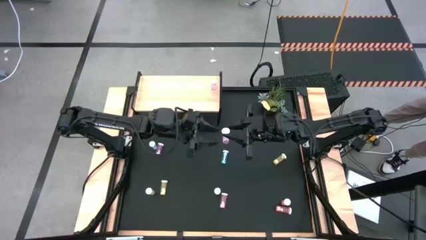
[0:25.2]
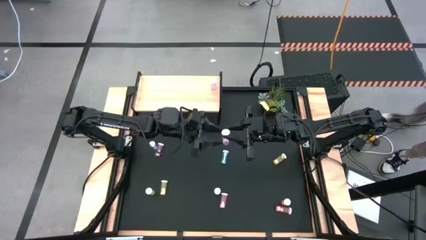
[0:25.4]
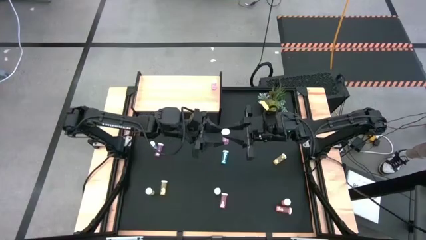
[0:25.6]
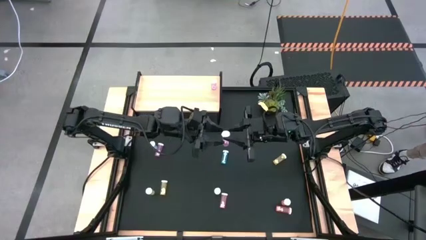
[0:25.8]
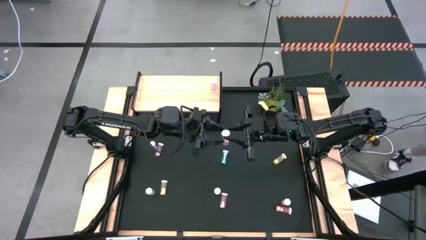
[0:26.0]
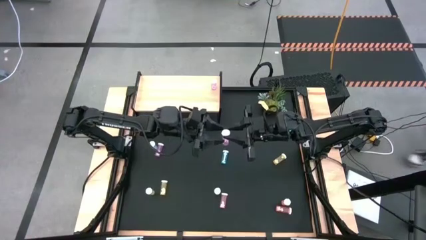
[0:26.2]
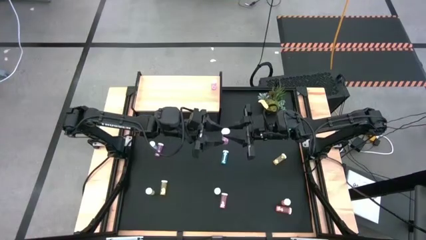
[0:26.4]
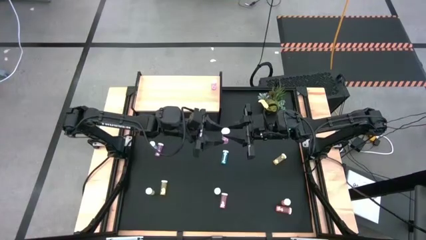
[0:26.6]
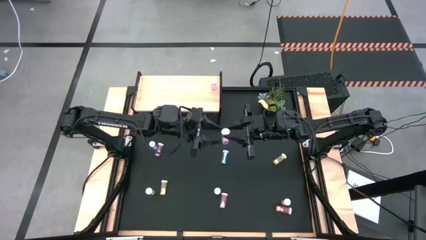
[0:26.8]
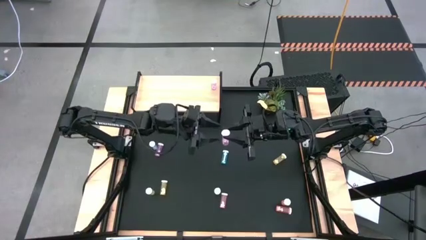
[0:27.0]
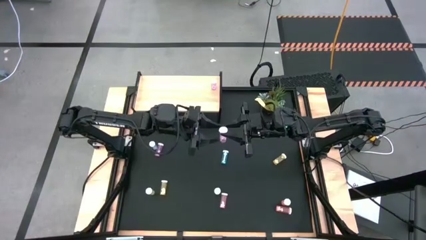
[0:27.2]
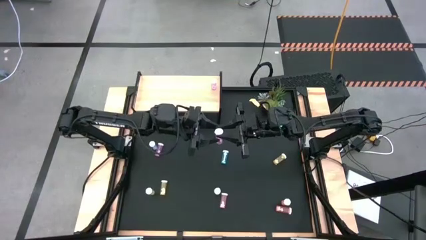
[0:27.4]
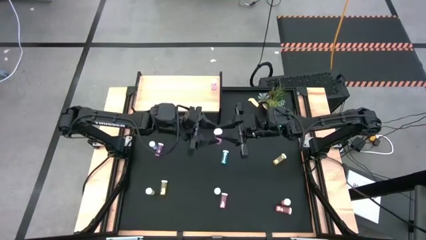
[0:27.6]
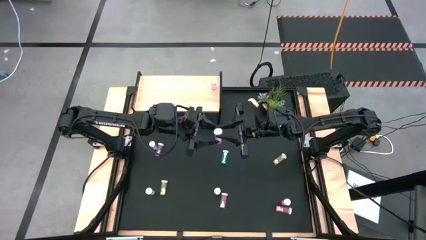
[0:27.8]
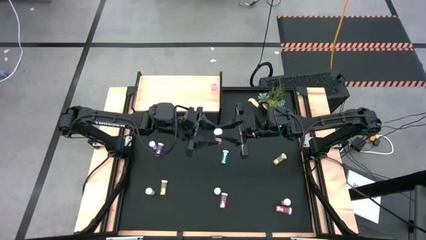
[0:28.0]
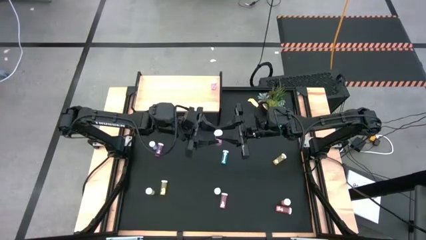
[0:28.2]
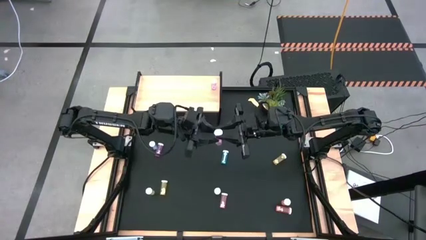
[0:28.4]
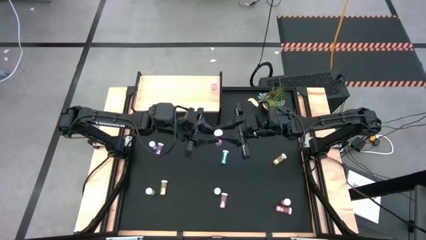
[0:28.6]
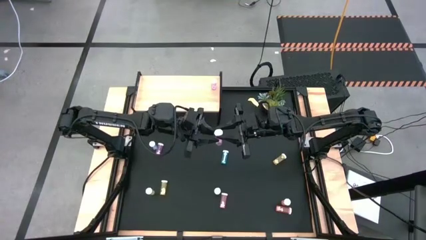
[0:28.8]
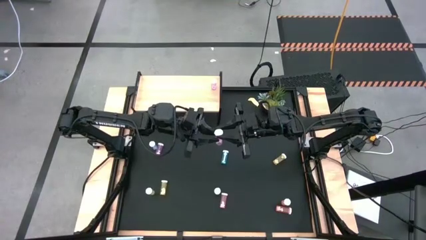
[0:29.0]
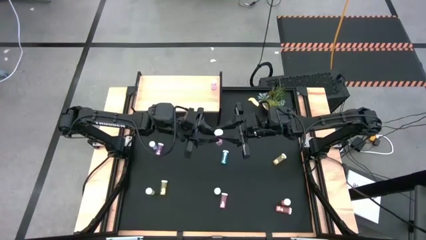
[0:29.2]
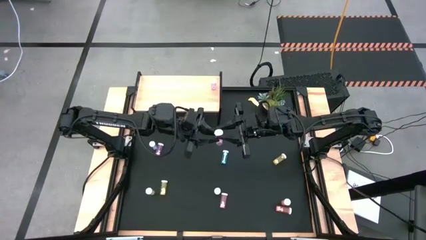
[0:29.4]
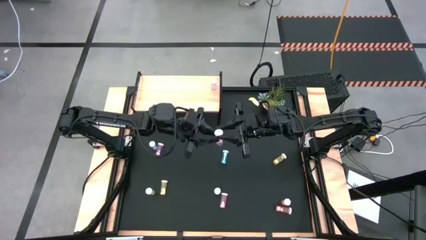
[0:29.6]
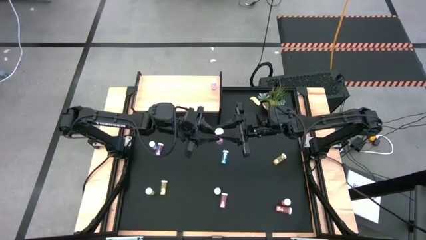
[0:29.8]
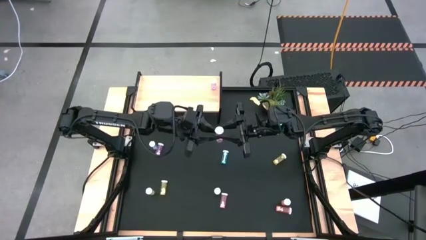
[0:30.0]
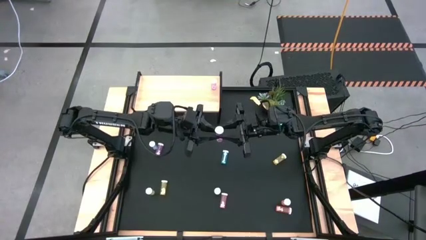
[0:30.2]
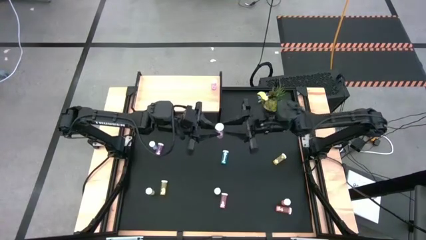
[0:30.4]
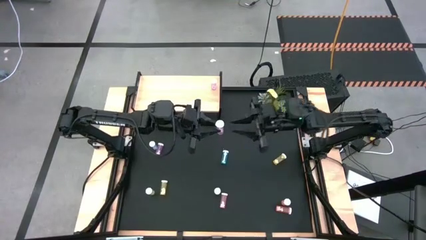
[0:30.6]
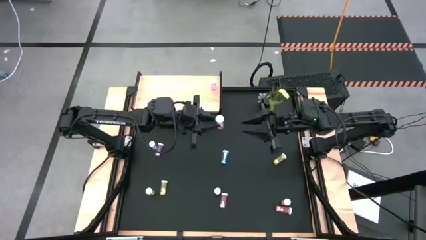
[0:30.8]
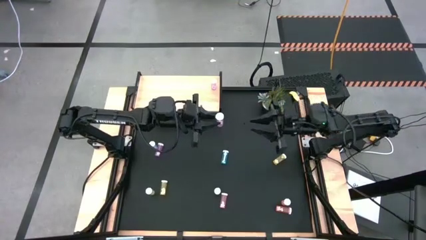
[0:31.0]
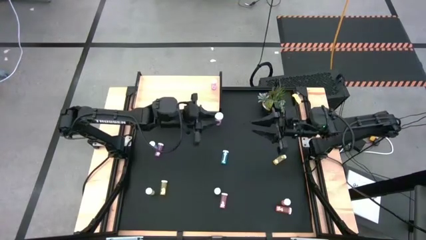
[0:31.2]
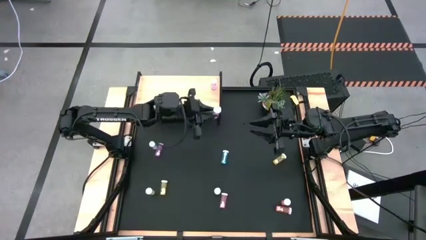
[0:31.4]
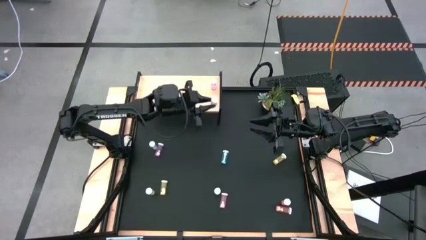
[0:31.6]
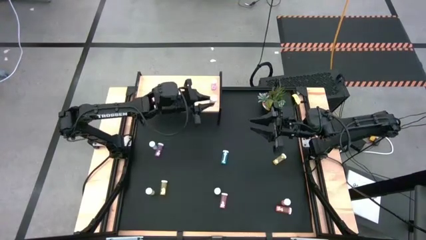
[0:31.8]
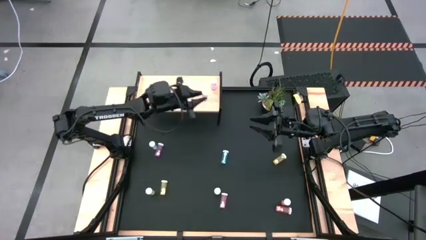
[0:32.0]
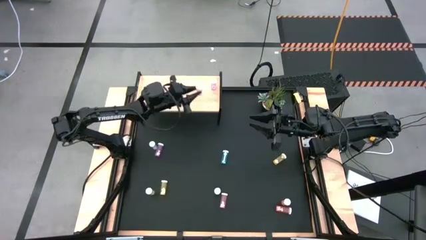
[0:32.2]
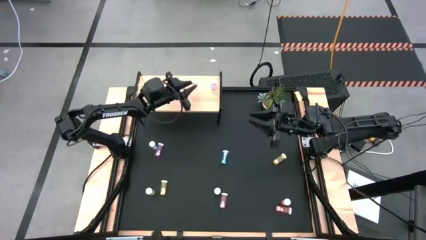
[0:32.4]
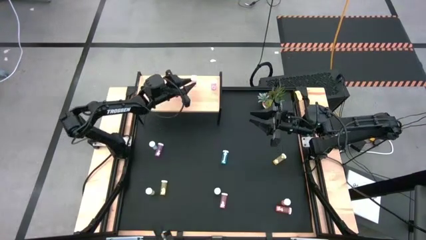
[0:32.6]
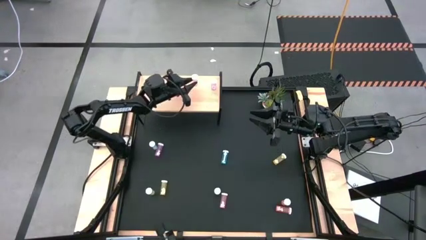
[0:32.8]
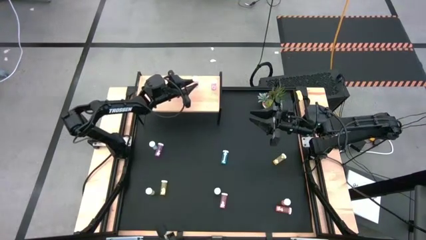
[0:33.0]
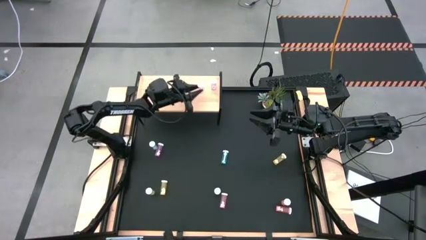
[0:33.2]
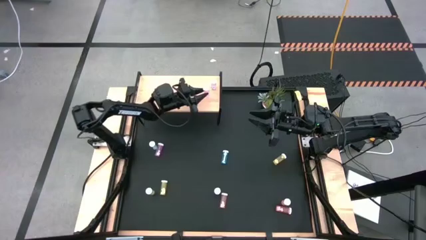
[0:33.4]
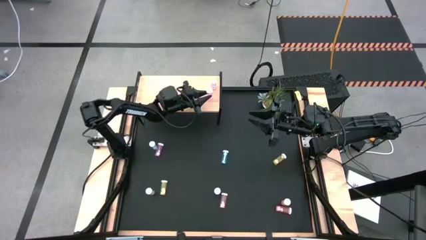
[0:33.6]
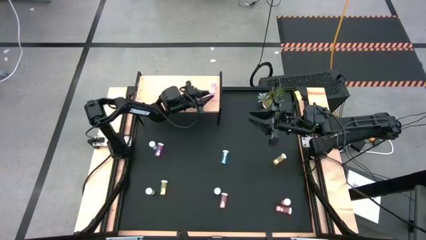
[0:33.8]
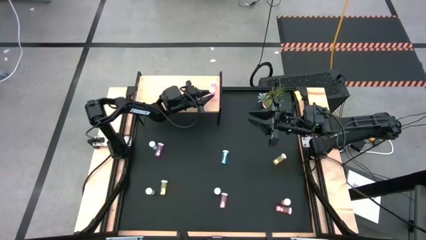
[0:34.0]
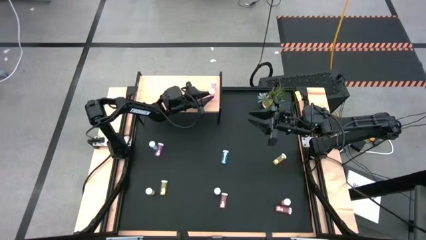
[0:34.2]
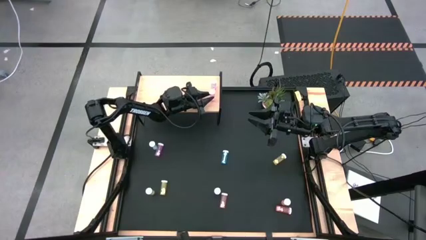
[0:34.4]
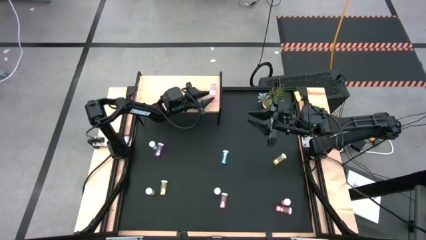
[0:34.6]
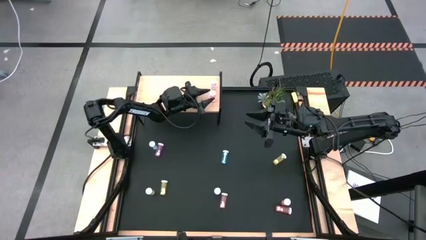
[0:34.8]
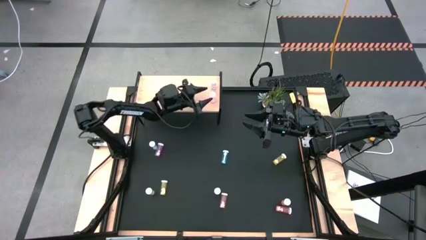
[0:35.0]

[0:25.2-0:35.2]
Task: Pick and place medicine bottles onto shelf by color
Put the right pink pill bottle on the shelf aligned with the other pink pill bottle

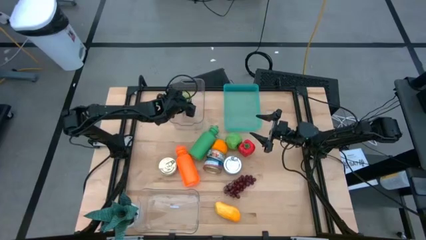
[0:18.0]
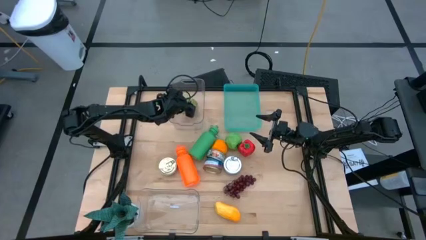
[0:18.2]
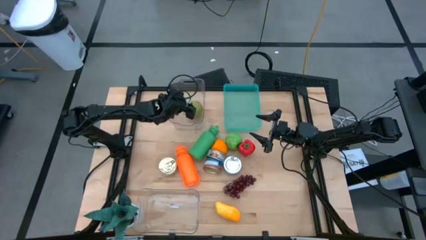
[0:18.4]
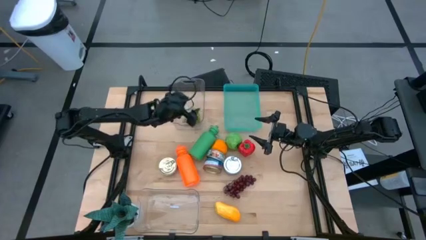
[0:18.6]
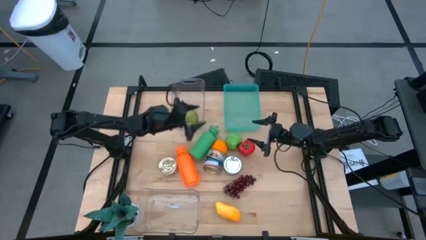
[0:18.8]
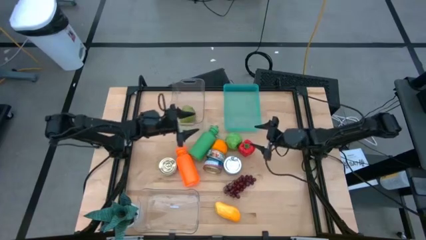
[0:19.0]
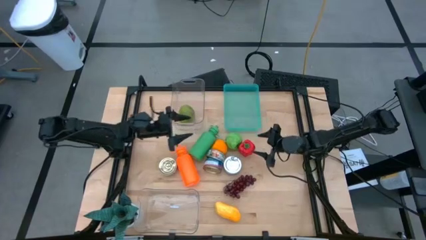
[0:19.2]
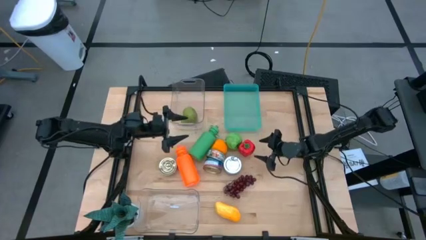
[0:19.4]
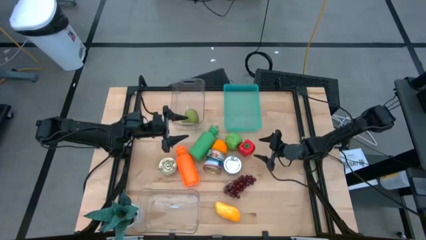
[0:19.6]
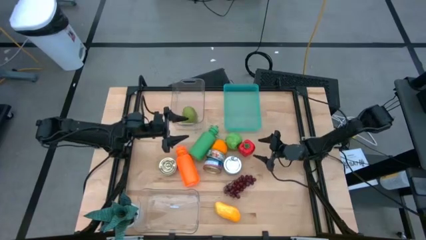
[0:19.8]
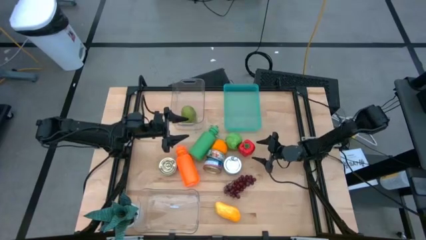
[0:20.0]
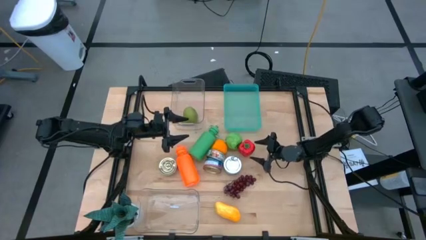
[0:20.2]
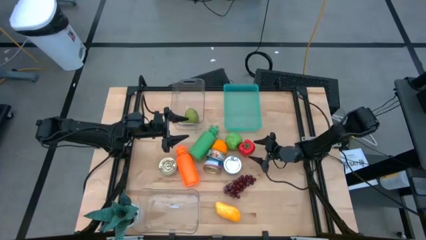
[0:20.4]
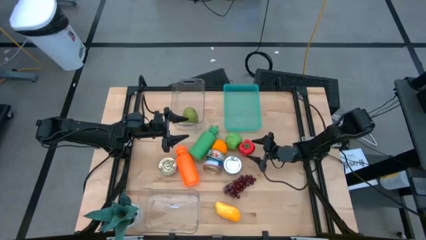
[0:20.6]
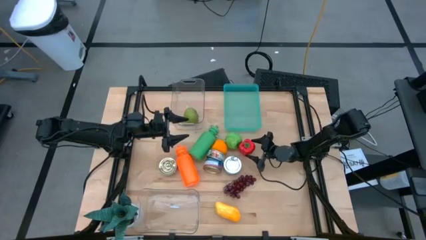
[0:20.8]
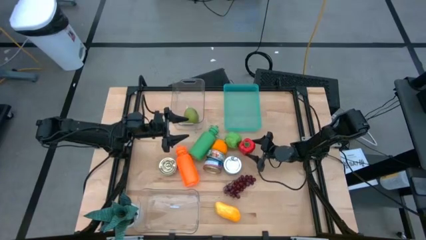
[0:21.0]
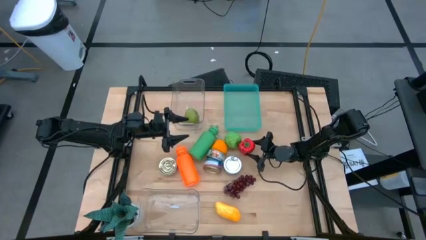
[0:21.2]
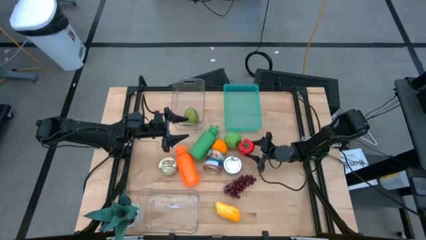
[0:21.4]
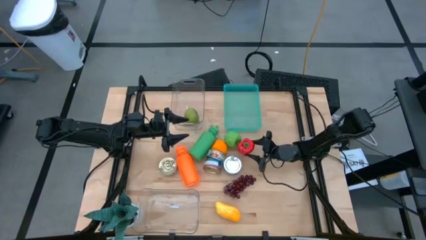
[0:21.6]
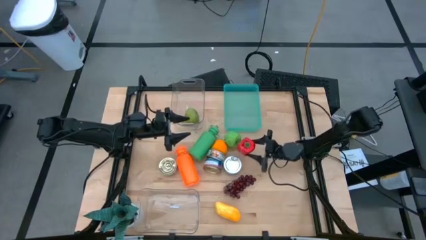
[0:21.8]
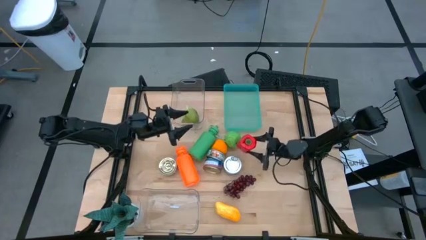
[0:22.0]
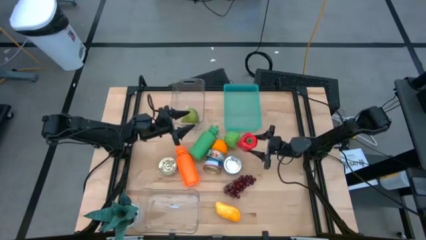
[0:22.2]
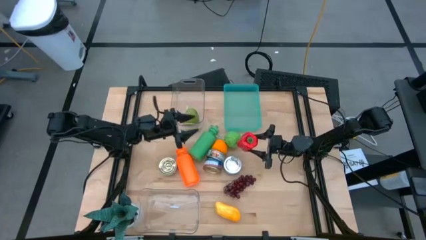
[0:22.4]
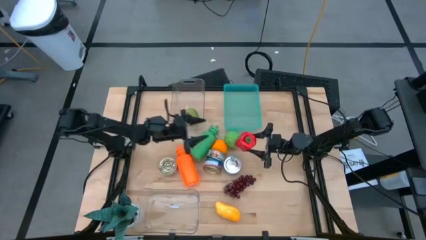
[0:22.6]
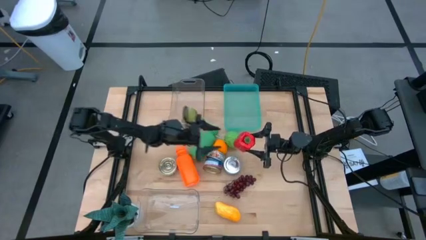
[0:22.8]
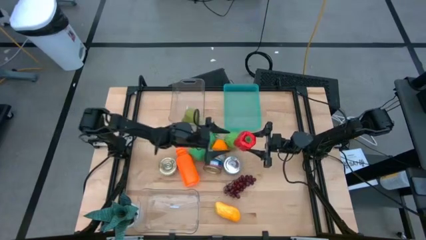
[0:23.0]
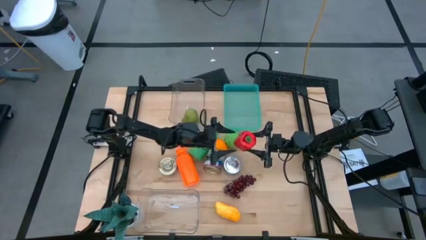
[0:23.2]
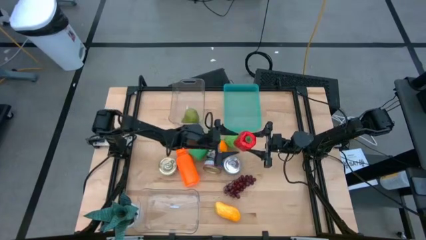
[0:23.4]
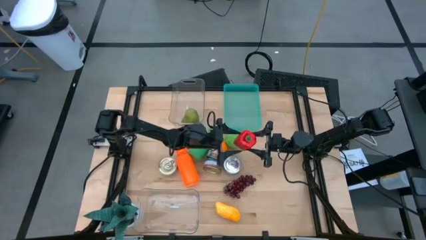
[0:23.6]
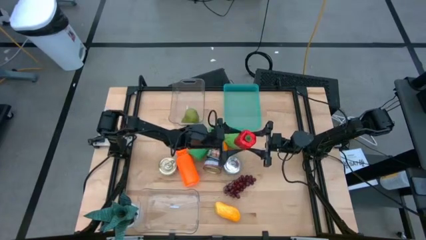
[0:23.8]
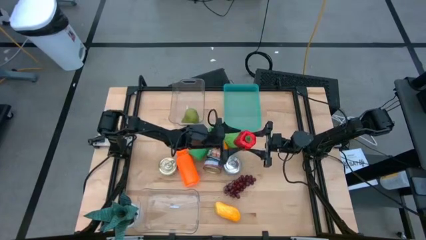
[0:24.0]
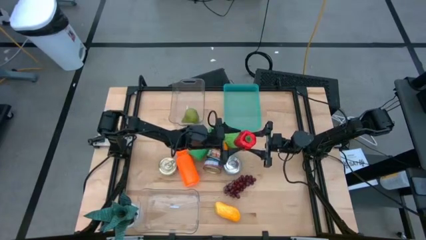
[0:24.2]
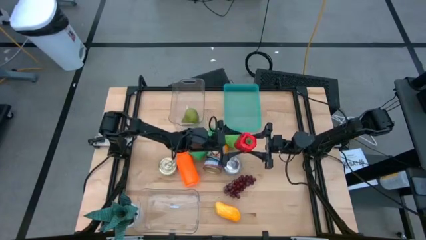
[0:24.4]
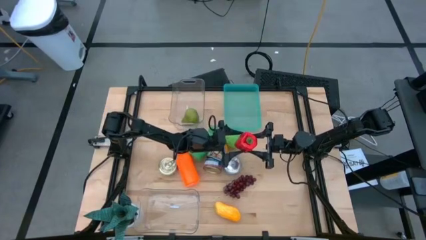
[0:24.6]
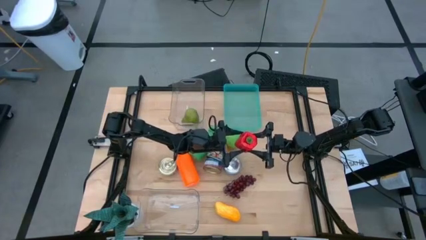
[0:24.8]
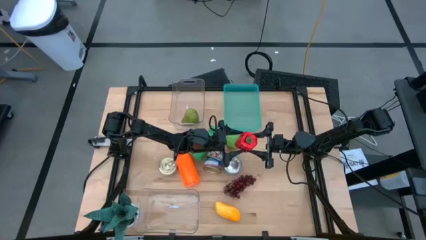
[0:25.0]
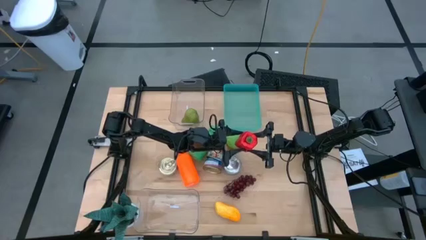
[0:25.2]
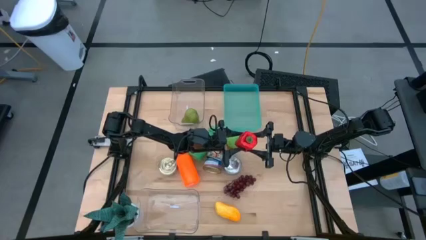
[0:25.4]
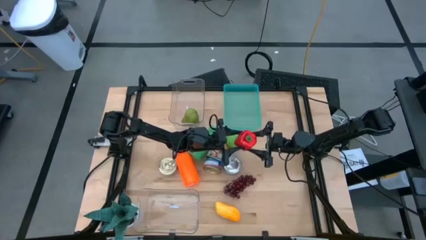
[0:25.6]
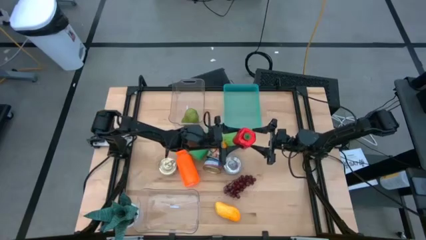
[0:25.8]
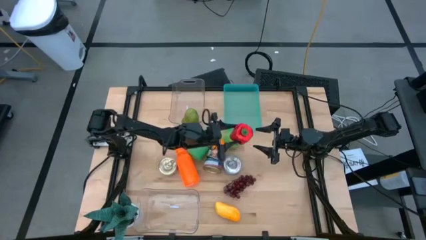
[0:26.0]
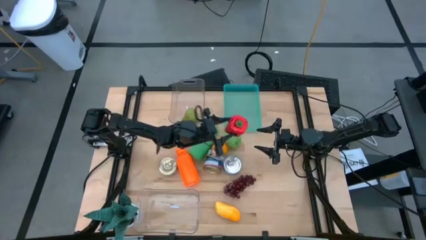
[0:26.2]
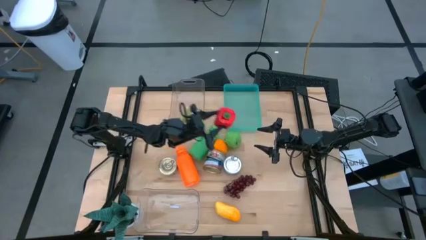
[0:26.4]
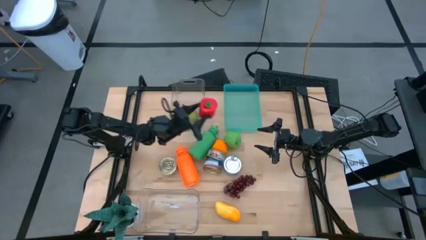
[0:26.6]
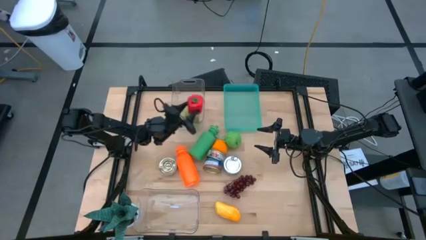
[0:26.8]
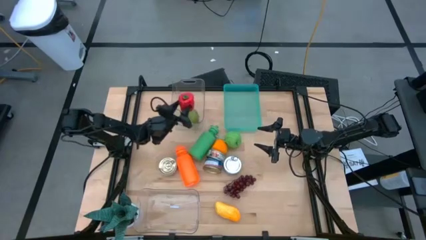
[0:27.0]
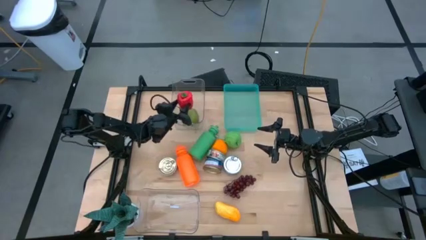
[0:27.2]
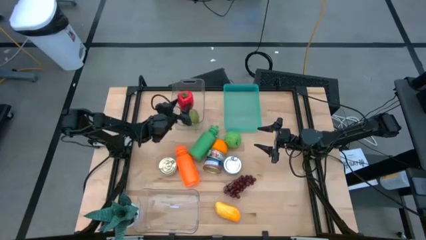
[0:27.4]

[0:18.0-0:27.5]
Task: Pick & Place Food Item
Put the red bell pepper into the top transparent bin
